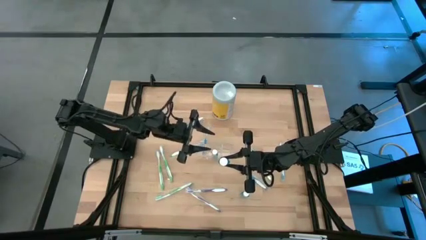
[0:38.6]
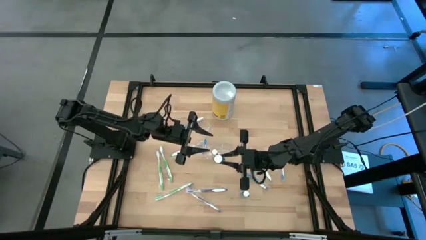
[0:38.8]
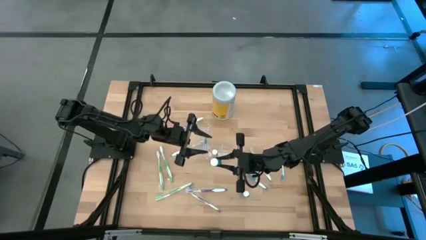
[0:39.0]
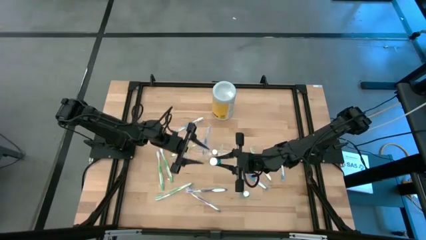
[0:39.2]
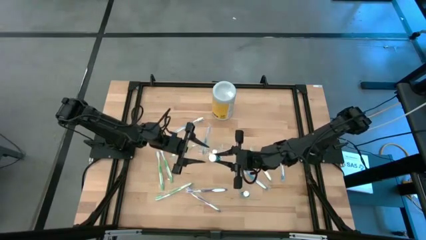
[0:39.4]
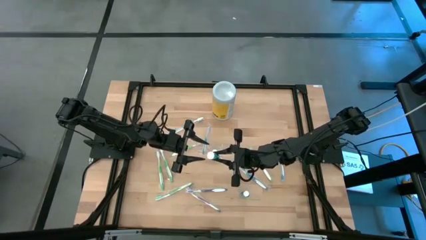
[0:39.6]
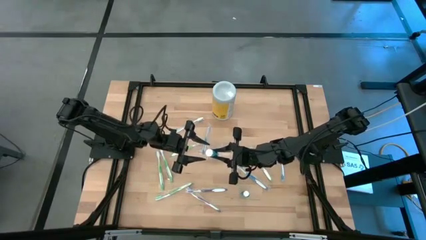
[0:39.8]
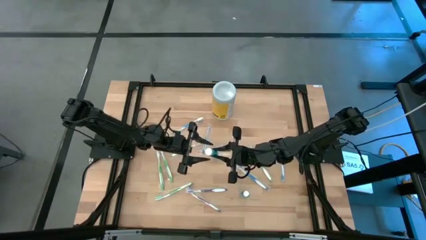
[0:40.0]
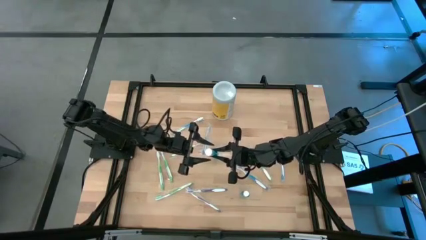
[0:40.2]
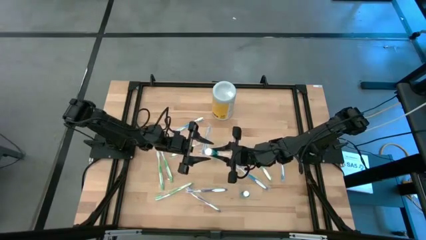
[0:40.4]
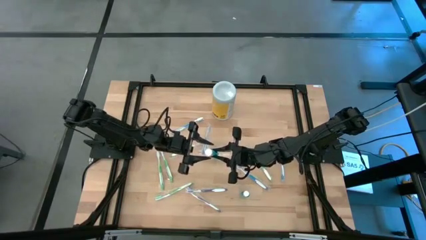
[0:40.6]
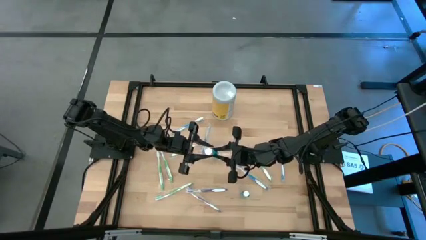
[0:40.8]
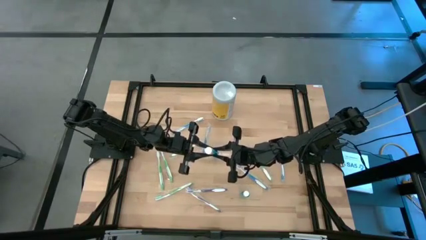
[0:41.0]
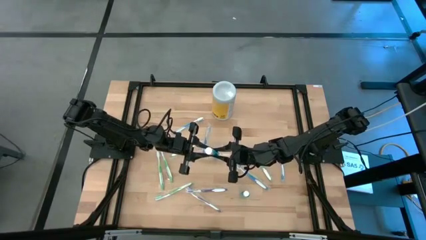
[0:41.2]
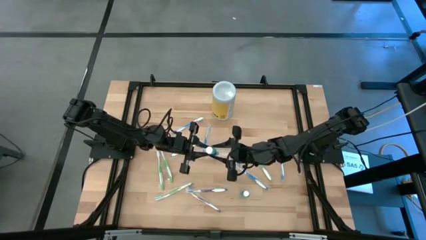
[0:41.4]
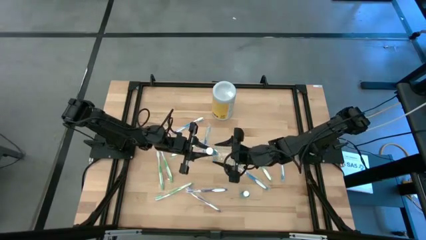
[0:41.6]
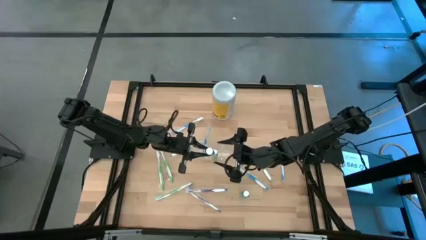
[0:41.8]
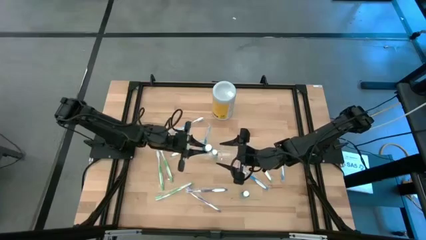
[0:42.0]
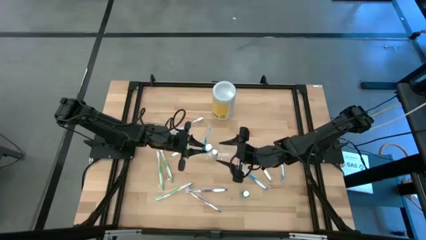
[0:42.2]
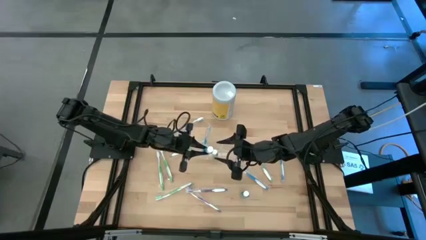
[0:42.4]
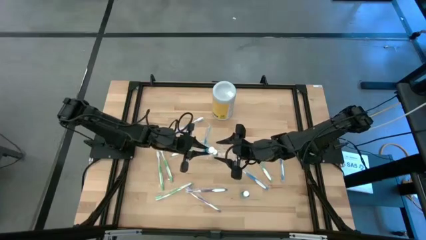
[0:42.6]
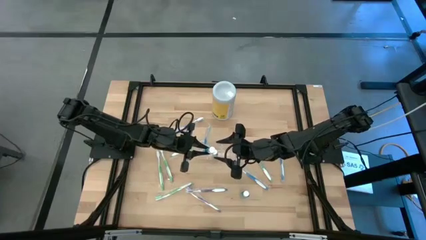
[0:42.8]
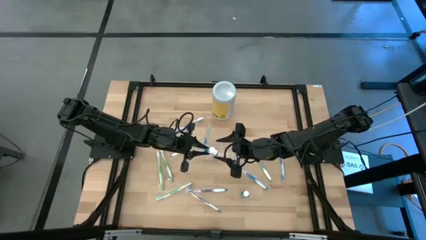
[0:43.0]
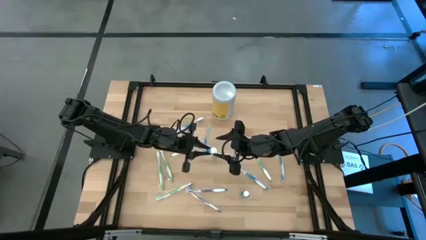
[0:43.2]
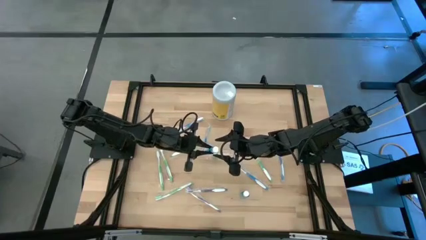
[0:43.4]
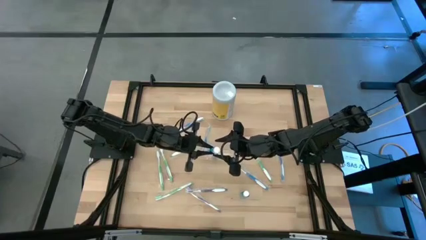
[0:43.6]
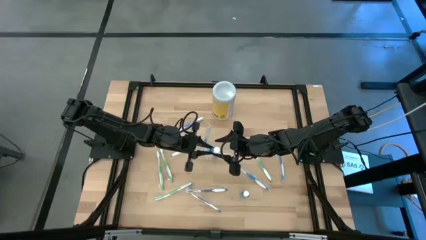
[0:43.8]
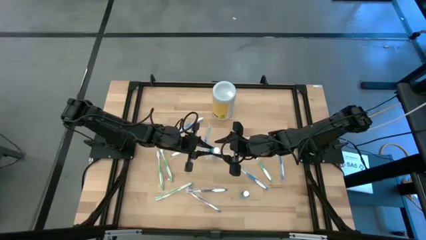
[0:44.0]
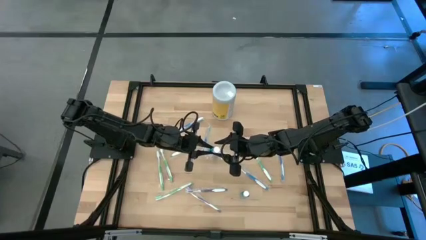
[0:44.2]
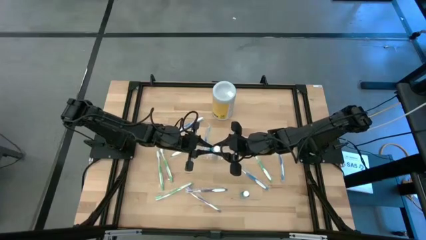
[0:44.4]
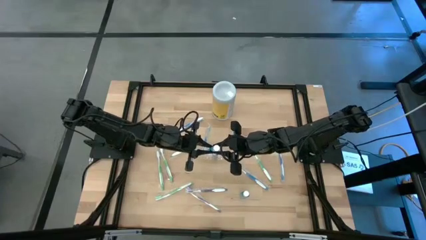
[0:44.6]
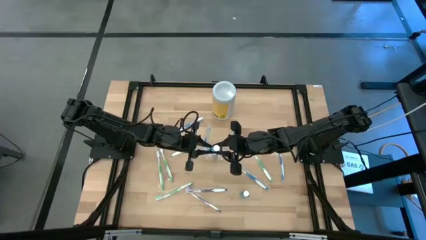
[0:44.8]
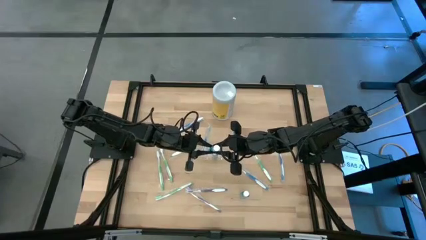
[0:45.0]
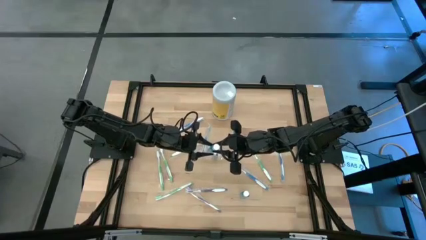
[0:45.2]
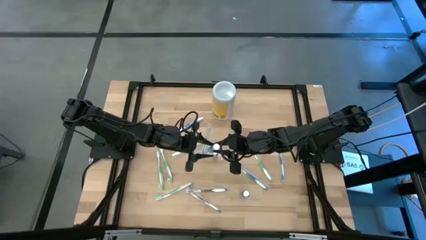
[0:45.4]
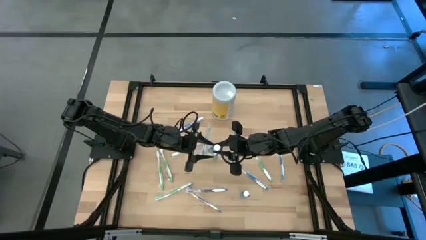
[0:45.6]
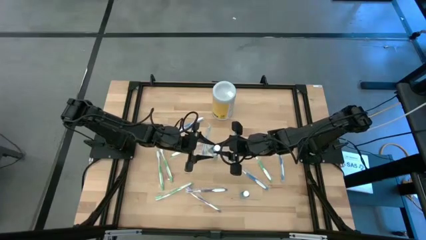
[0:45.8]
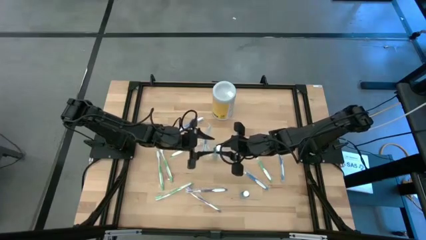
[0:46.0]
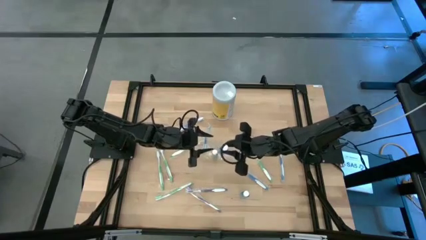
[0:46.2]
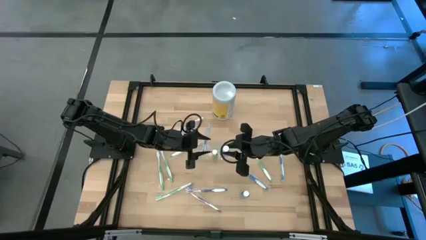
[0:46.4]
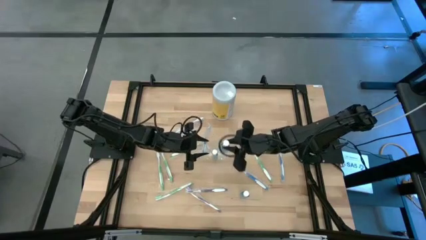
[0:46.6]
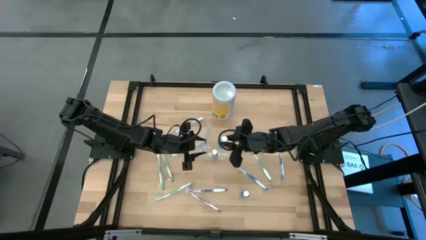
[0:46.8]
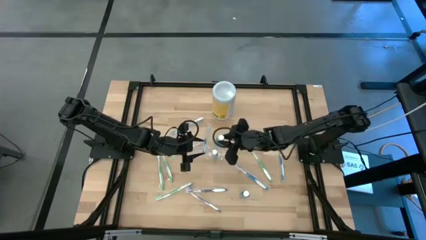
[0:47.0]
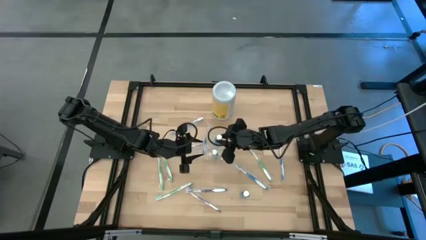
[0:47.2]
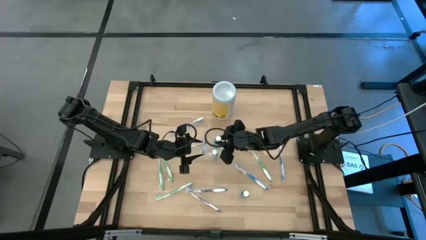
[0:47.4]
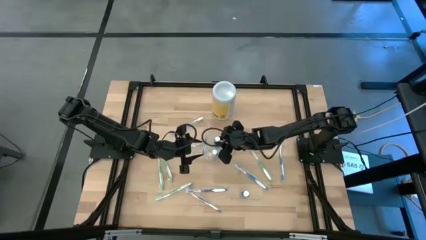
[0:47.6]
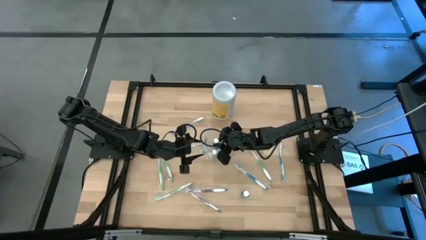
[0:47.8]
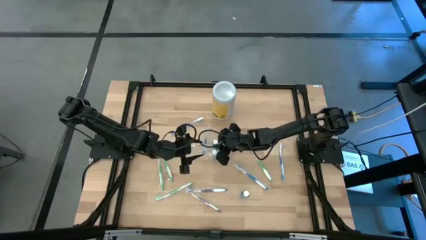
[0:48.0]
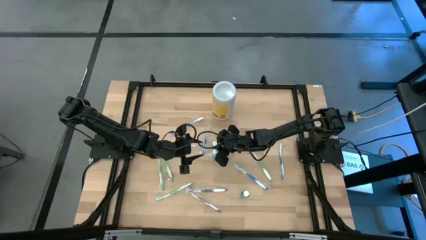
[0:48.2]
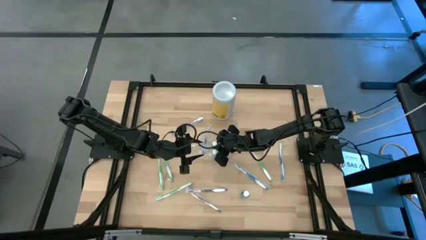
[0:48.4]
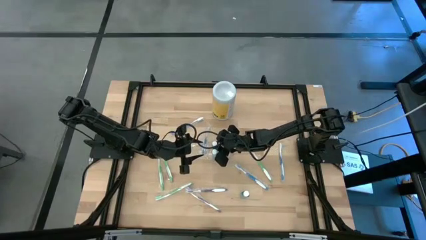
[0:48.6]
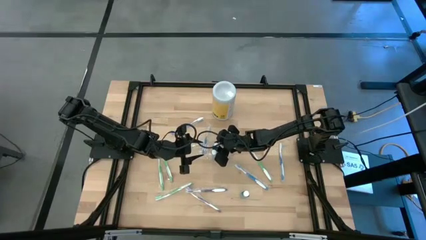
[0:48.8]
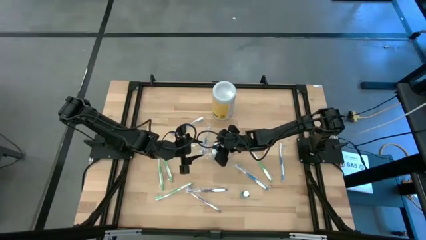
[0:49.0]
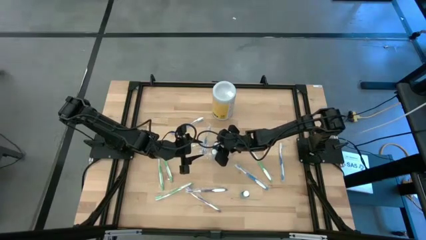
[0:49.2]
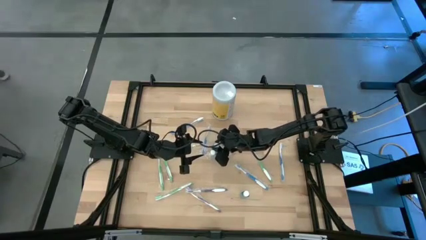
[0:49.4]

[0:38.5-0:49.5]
Task: Pick & Place toothbrushing station
Put the blue mouthwash into the transparent organizer
